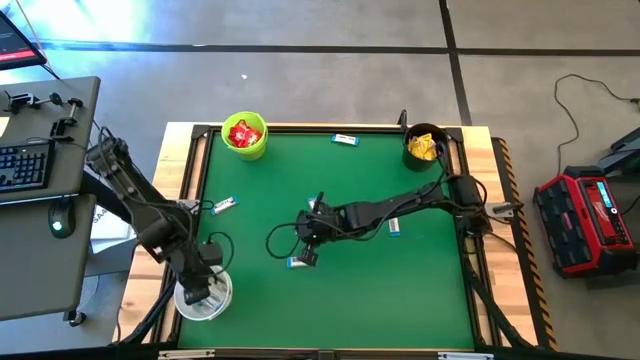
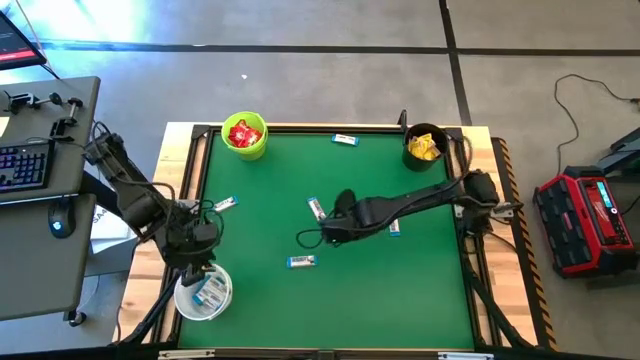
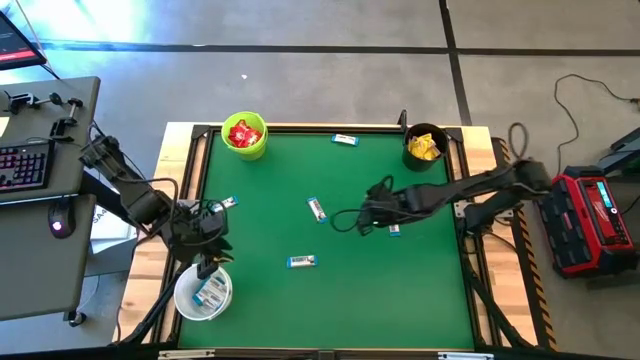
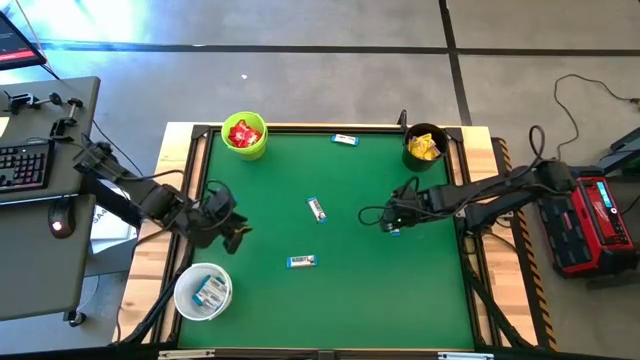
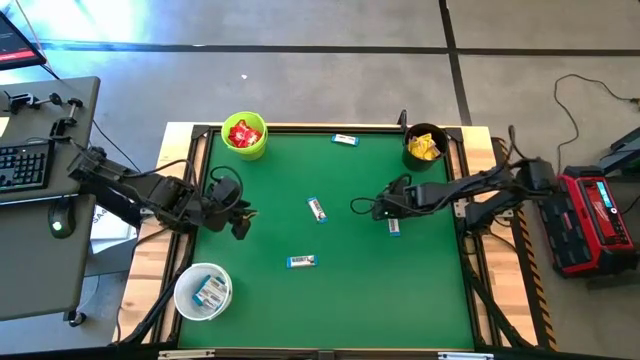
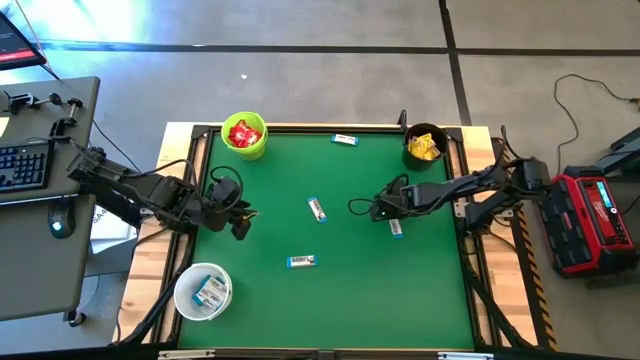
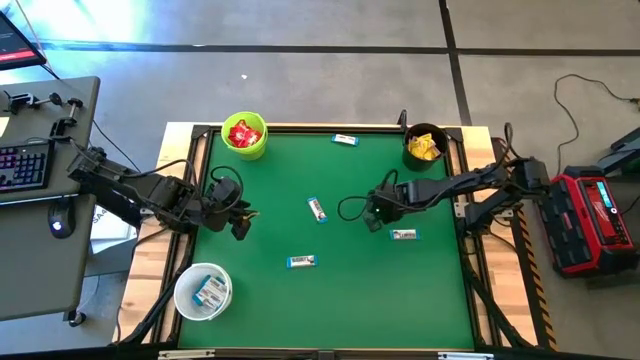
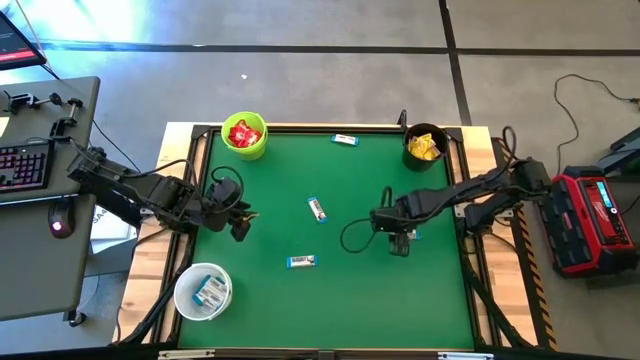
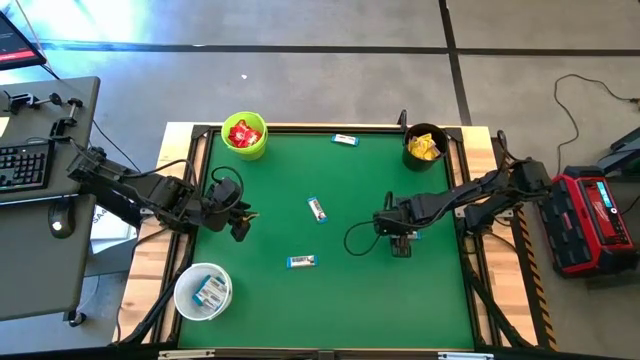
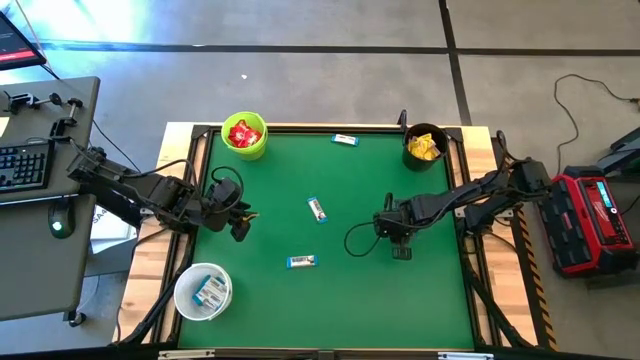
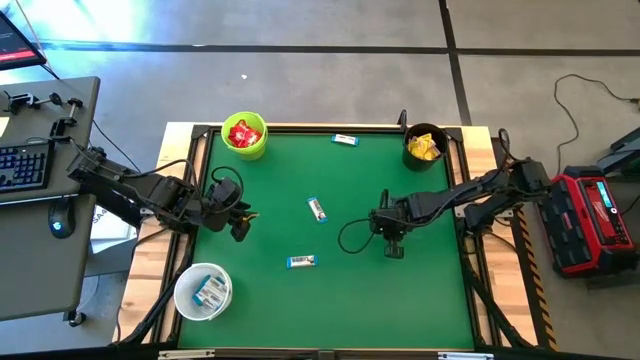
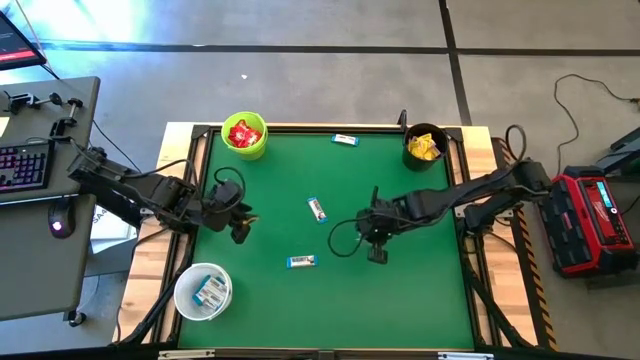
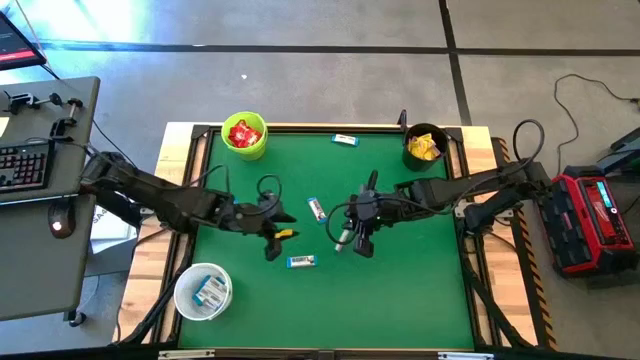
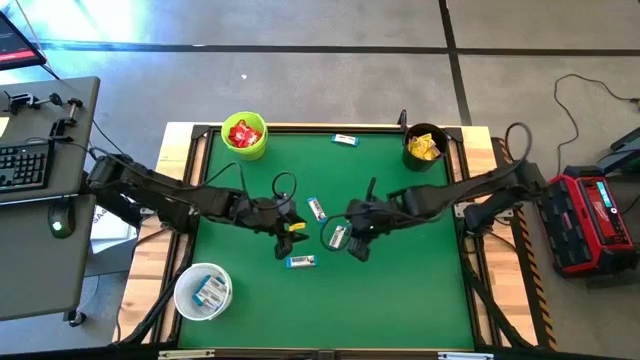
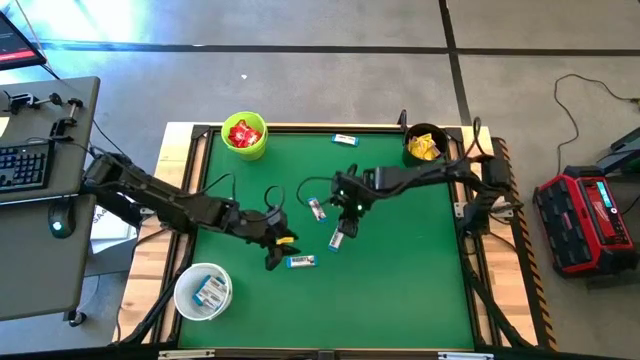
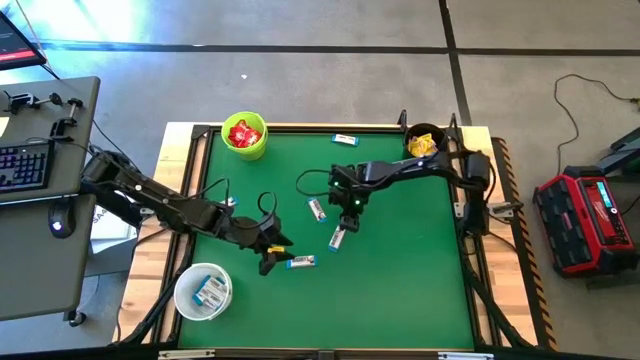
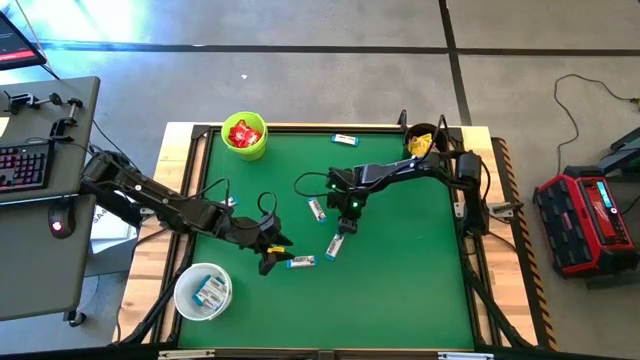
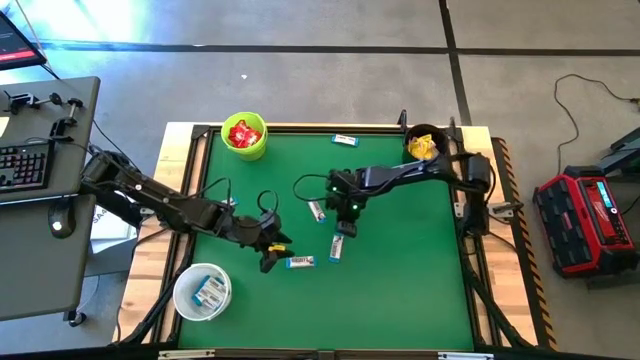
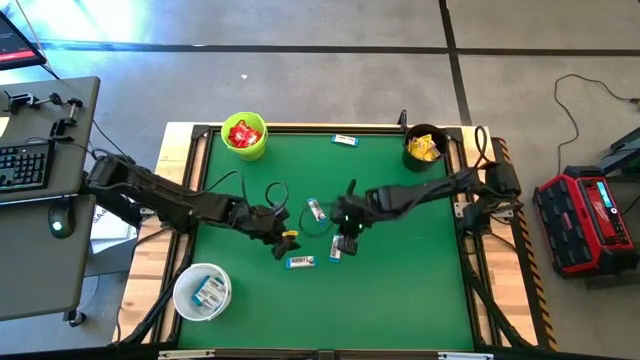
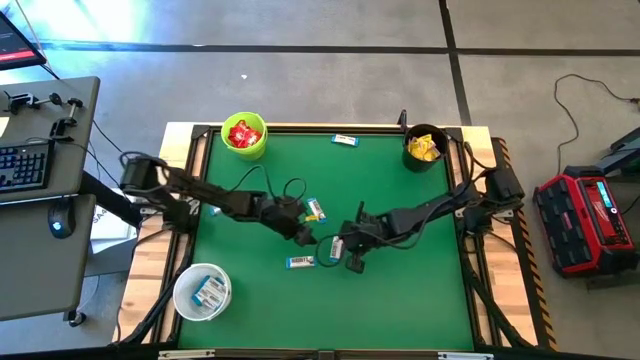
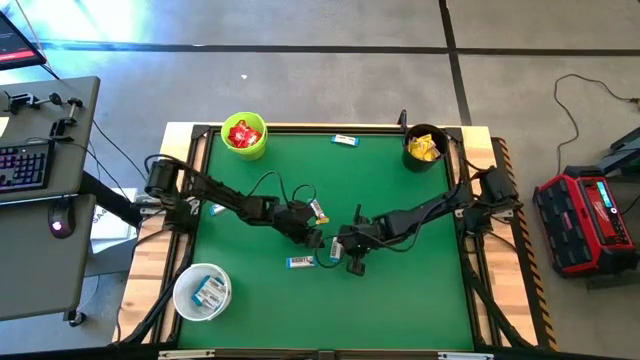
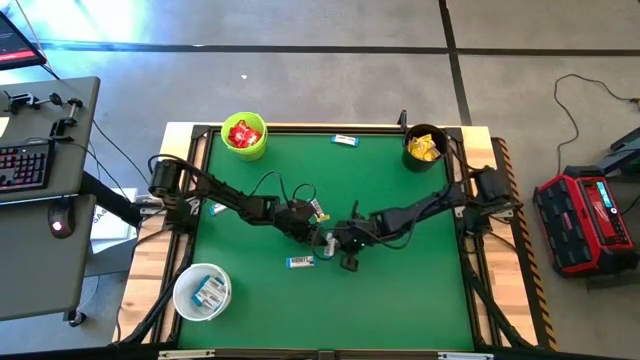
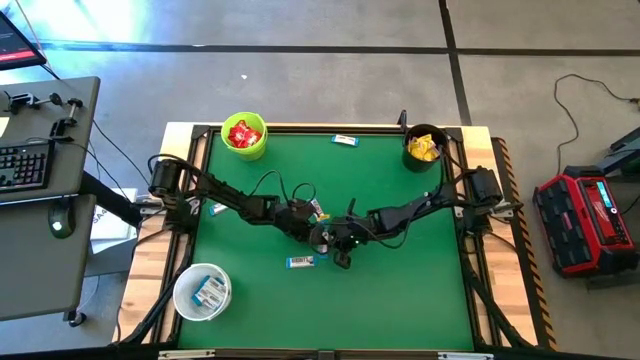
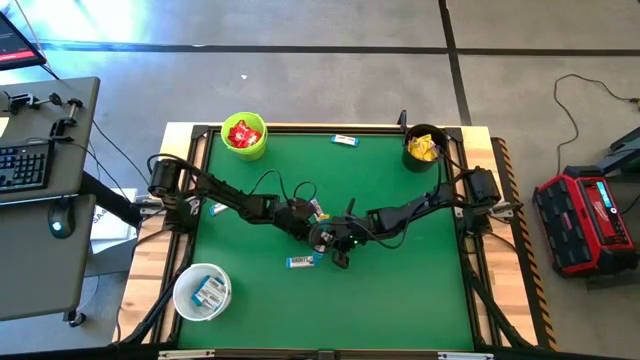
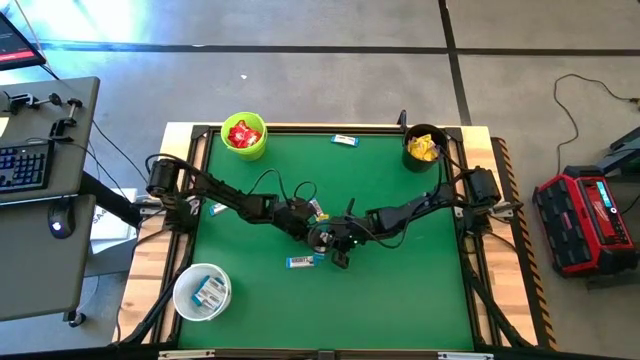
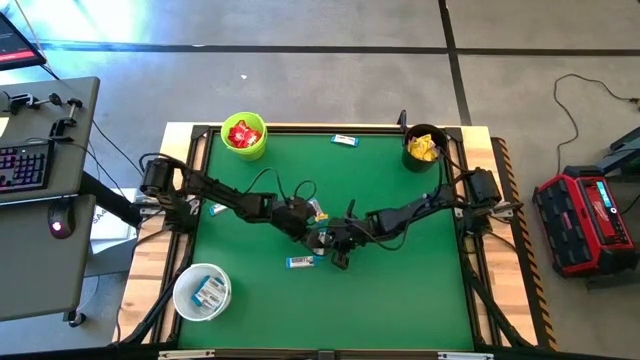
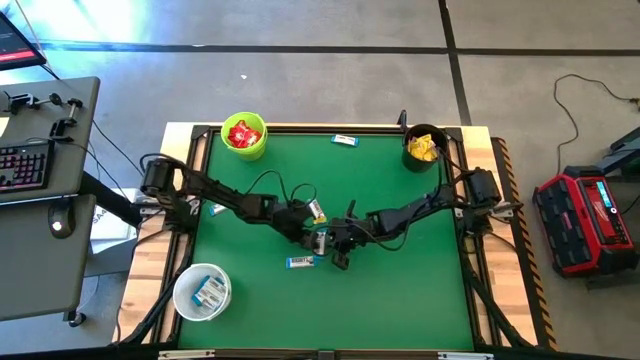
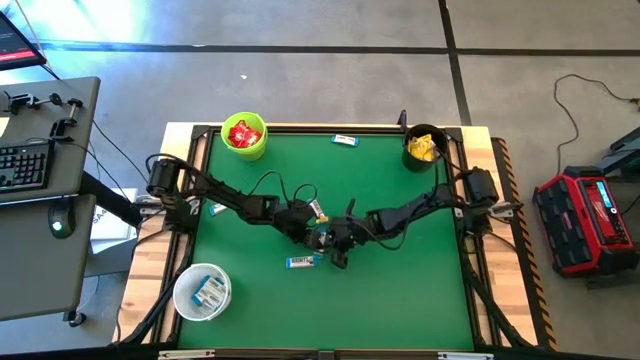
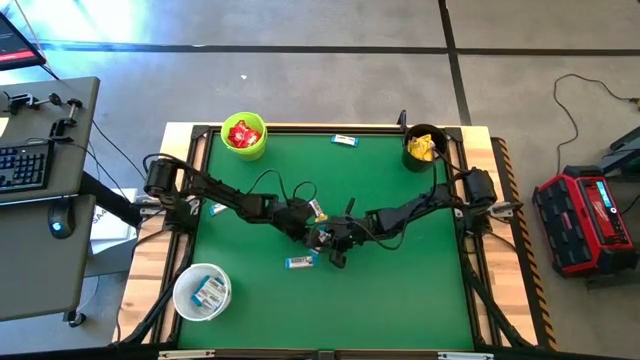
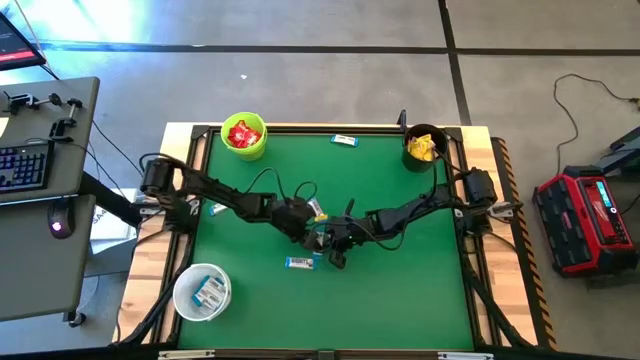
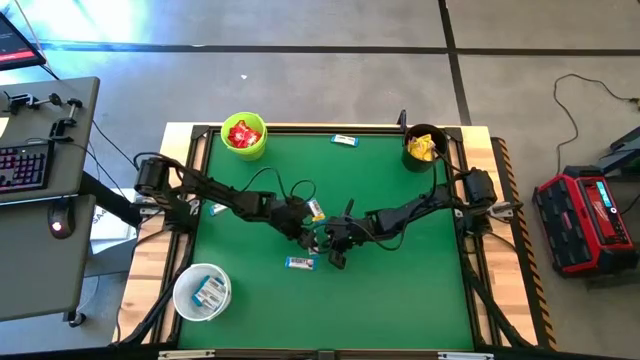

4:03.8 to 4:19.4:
Task: Sort candy by brand, put in halloween buckets
Put the white chocolate into the white bucket

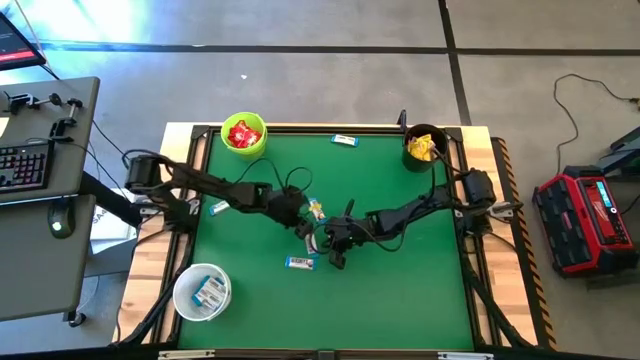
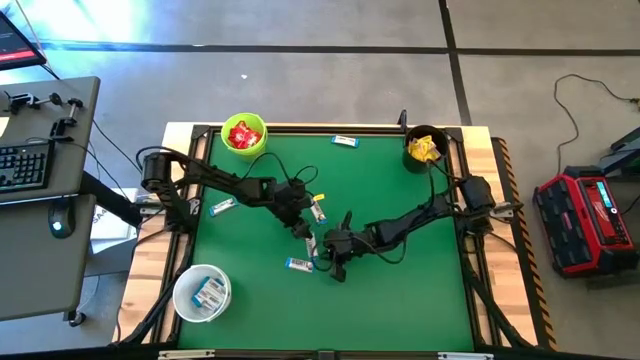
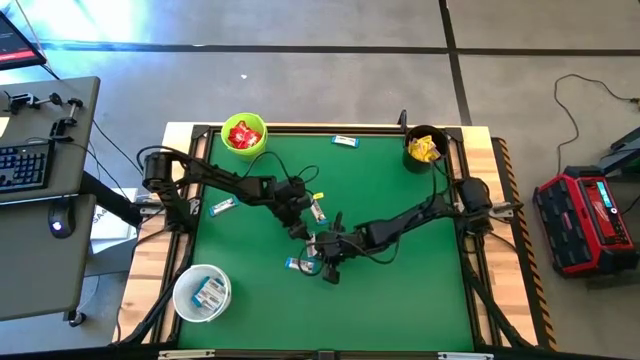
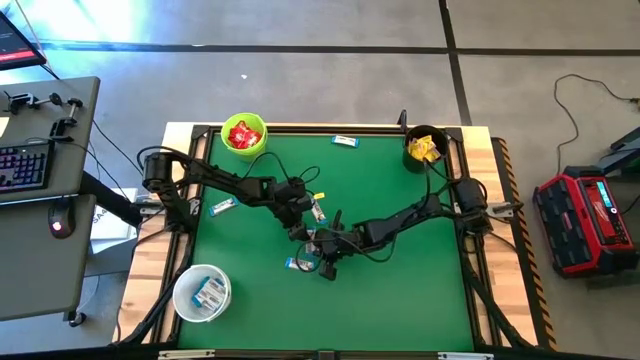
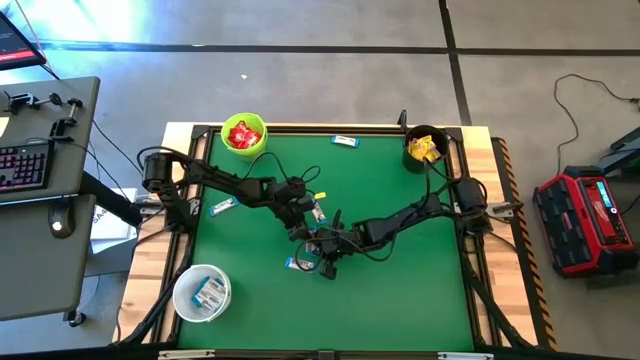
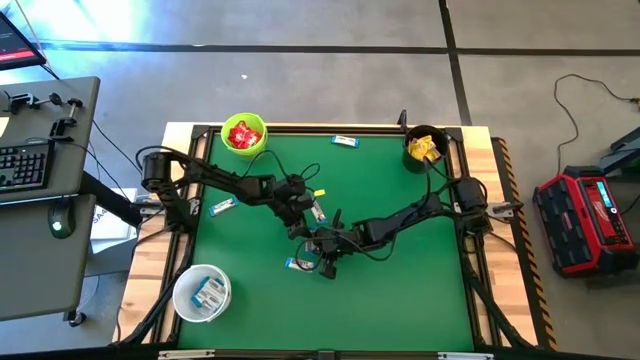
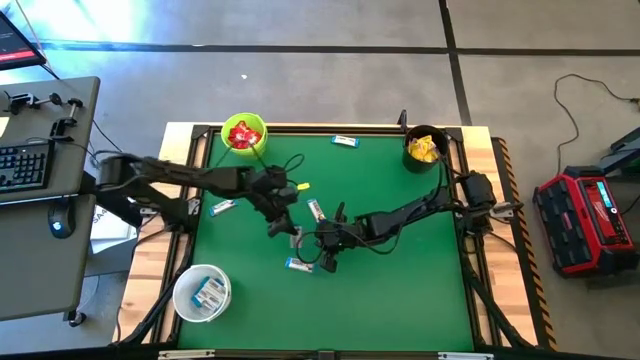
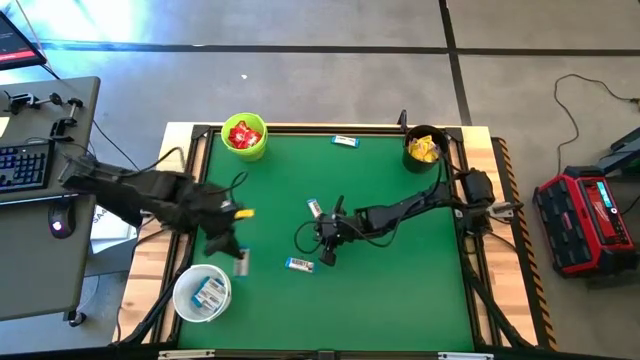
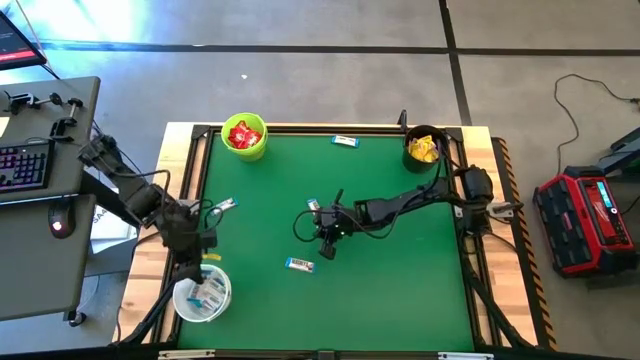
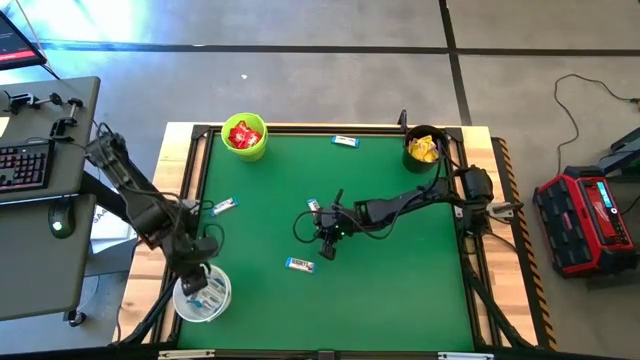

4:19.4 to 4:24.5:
Put the white chocolate into the white bucket
